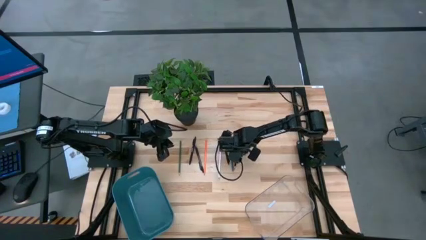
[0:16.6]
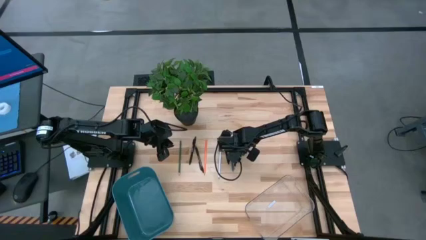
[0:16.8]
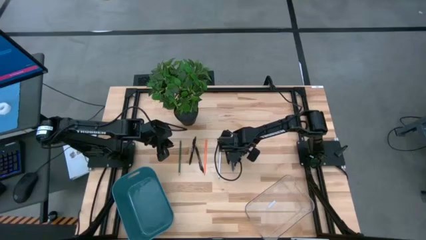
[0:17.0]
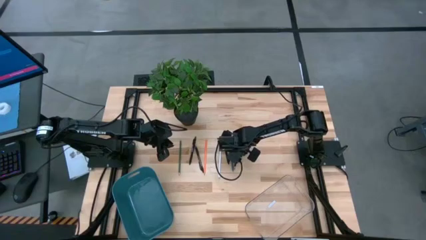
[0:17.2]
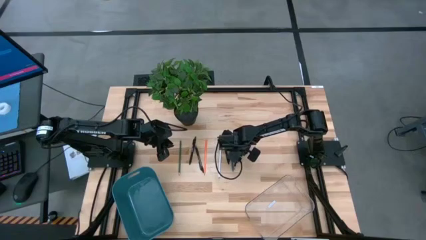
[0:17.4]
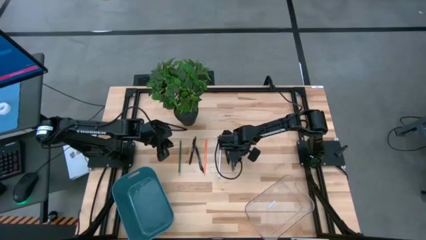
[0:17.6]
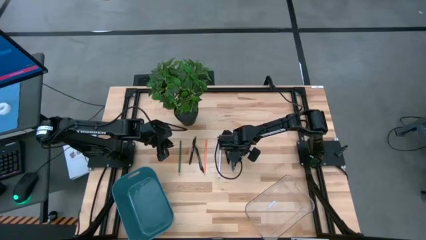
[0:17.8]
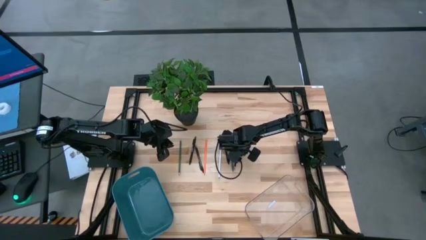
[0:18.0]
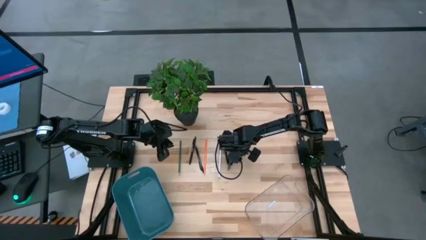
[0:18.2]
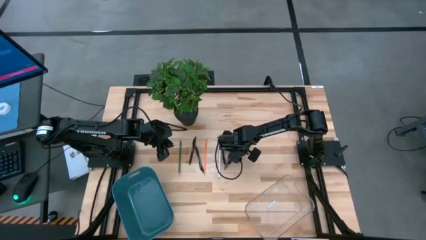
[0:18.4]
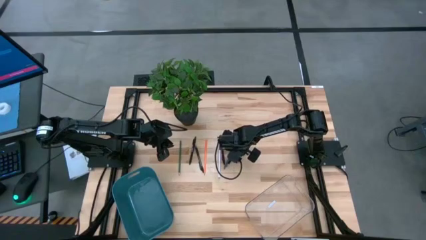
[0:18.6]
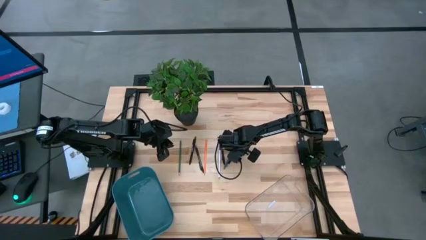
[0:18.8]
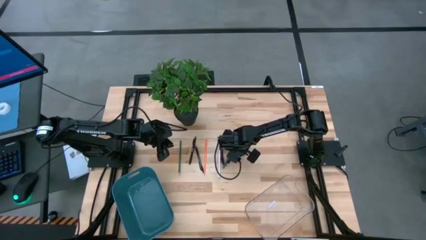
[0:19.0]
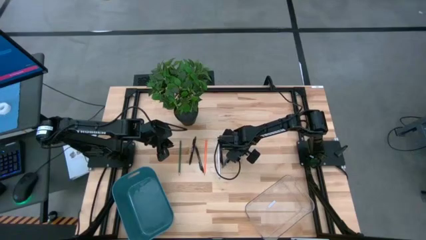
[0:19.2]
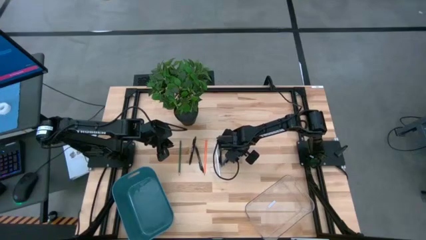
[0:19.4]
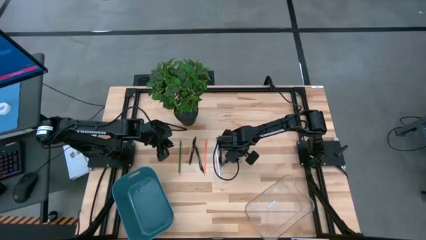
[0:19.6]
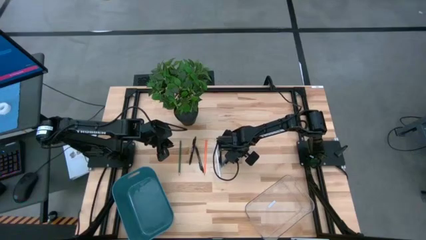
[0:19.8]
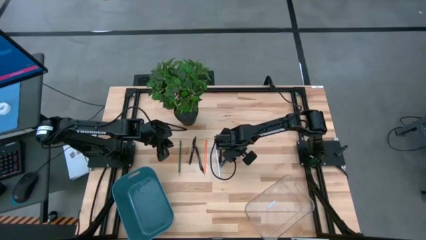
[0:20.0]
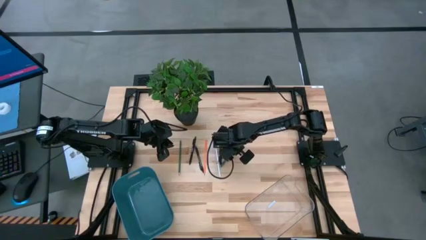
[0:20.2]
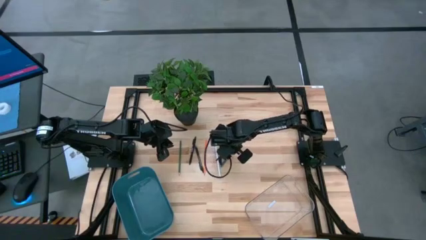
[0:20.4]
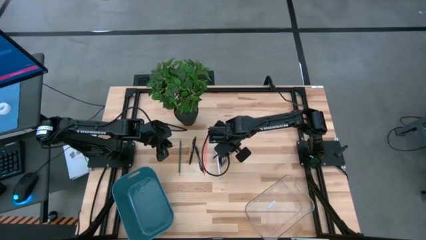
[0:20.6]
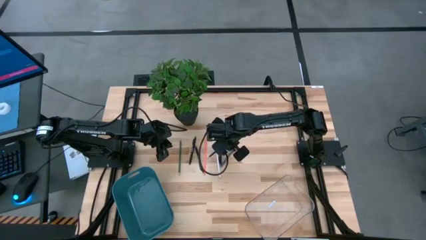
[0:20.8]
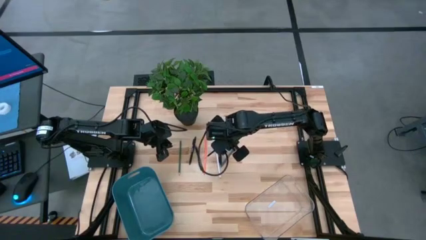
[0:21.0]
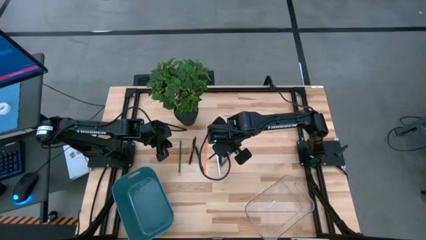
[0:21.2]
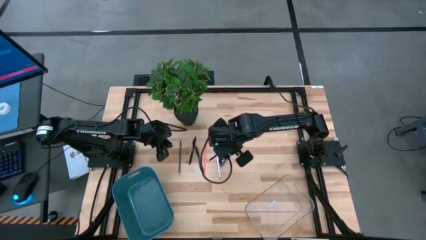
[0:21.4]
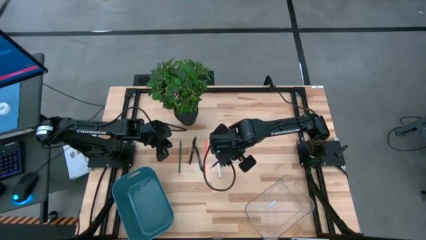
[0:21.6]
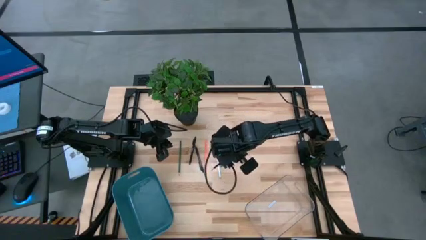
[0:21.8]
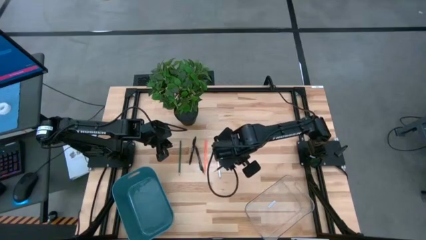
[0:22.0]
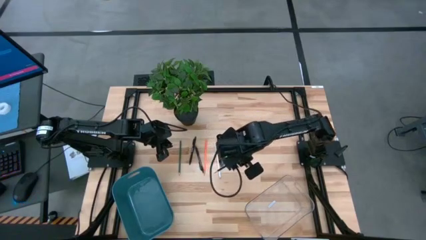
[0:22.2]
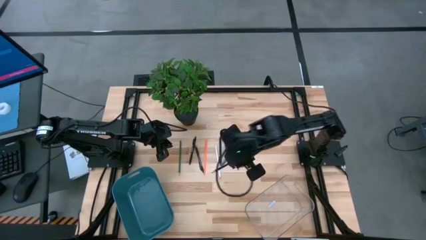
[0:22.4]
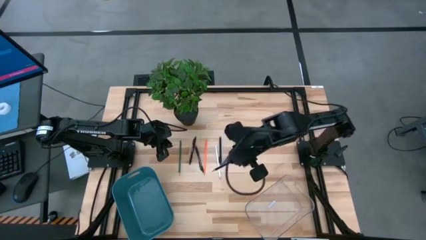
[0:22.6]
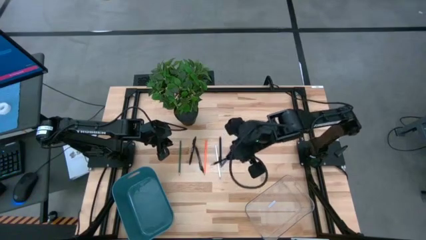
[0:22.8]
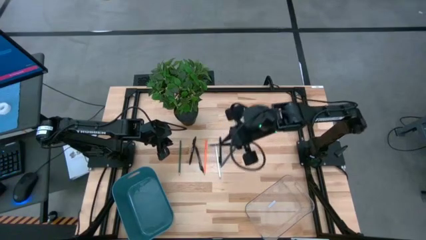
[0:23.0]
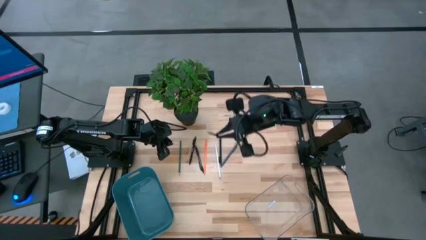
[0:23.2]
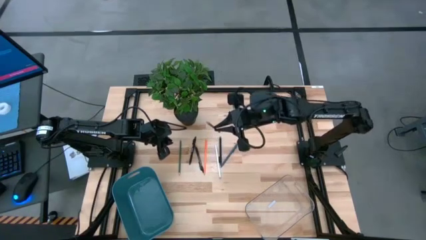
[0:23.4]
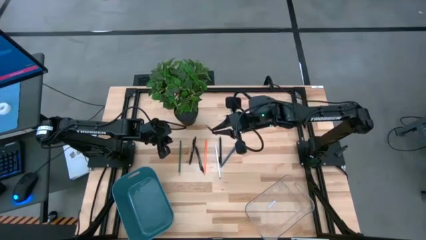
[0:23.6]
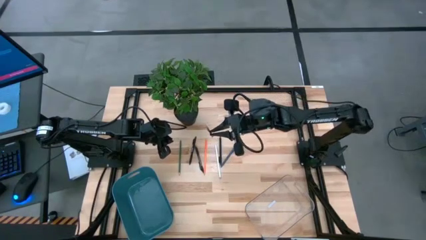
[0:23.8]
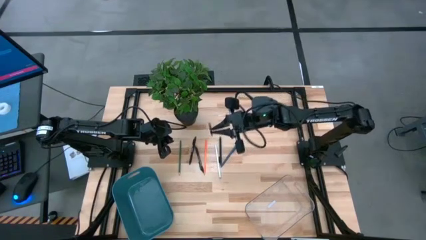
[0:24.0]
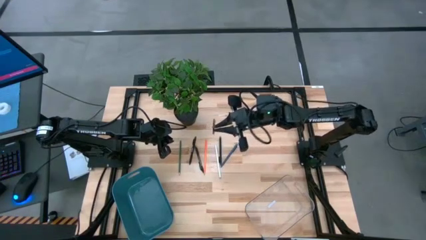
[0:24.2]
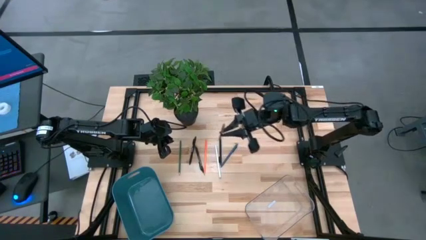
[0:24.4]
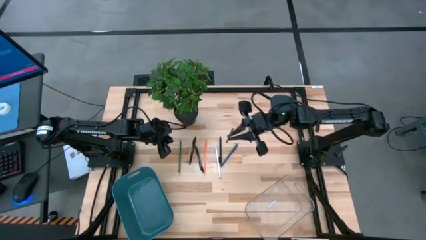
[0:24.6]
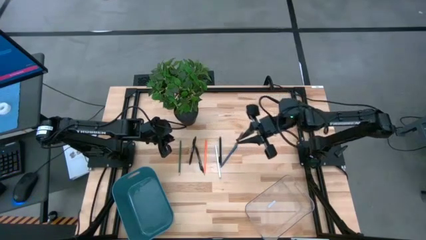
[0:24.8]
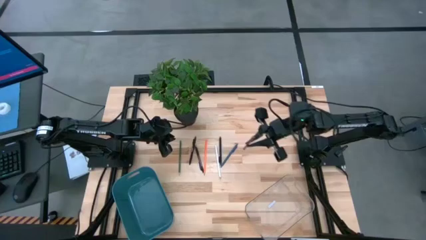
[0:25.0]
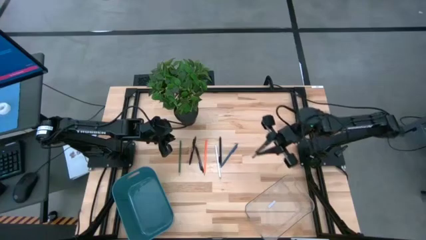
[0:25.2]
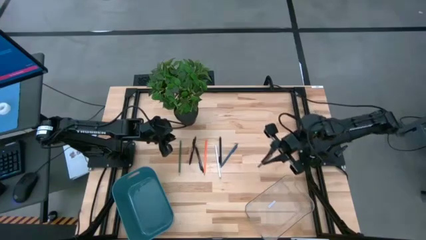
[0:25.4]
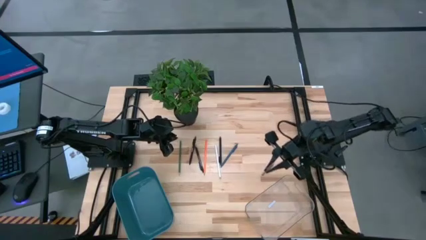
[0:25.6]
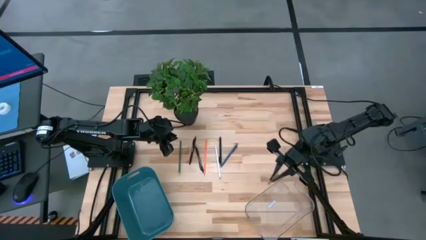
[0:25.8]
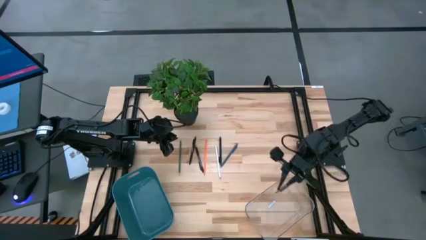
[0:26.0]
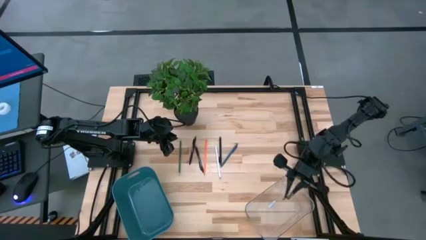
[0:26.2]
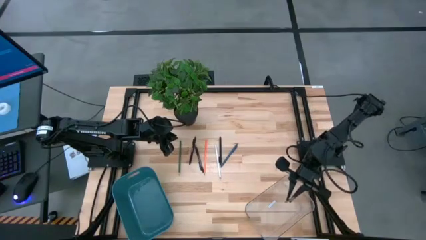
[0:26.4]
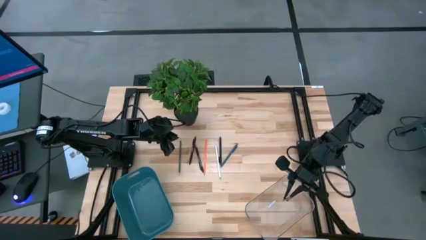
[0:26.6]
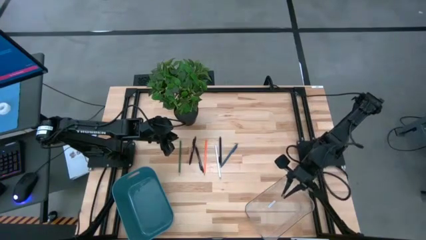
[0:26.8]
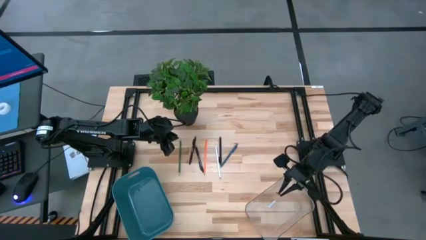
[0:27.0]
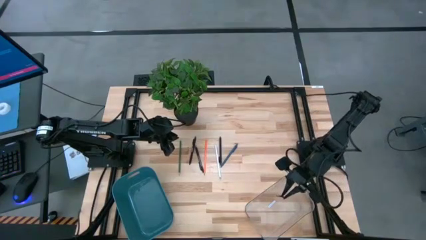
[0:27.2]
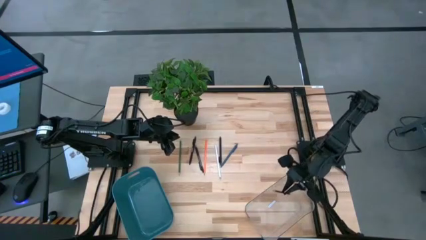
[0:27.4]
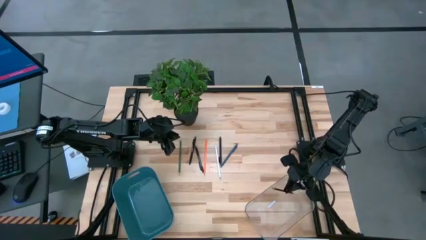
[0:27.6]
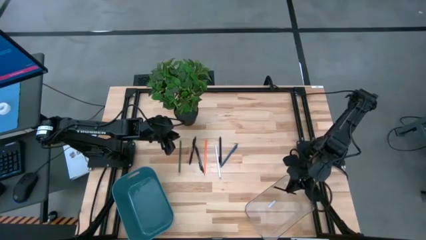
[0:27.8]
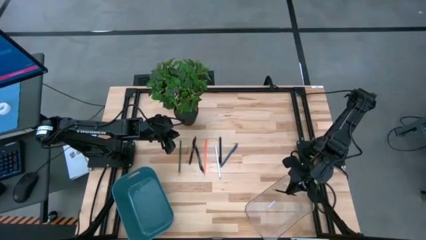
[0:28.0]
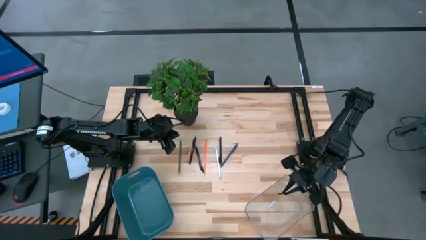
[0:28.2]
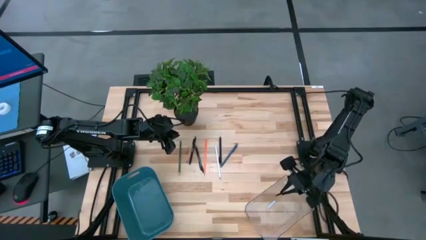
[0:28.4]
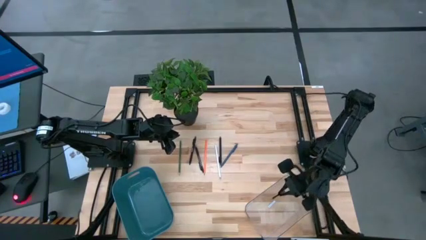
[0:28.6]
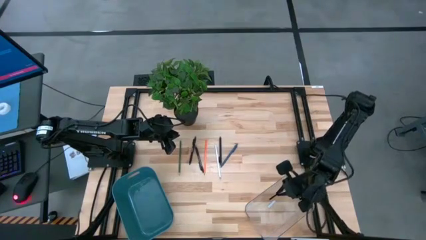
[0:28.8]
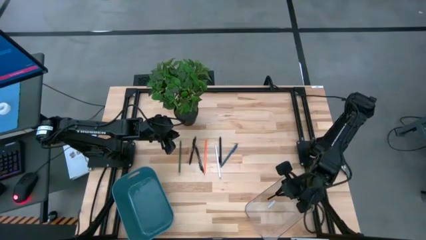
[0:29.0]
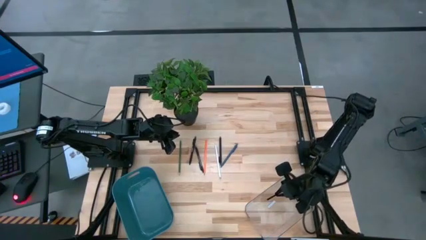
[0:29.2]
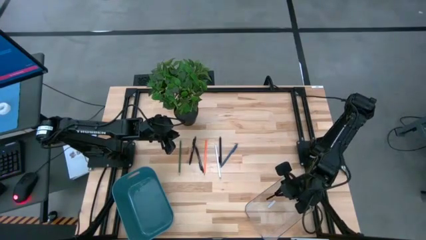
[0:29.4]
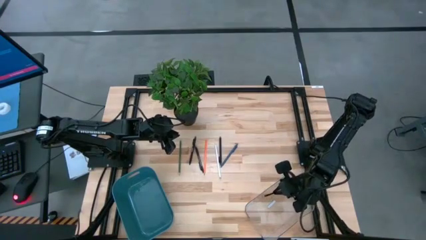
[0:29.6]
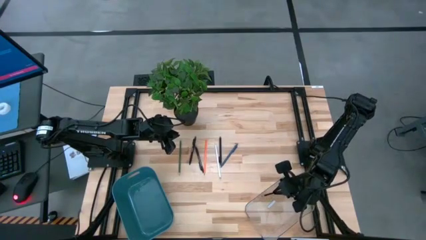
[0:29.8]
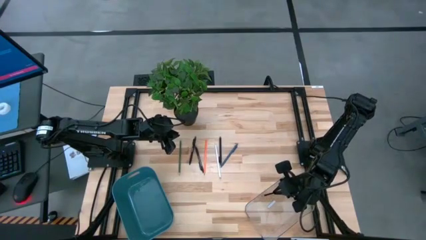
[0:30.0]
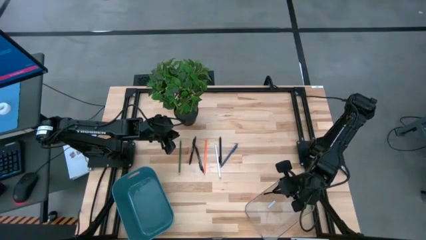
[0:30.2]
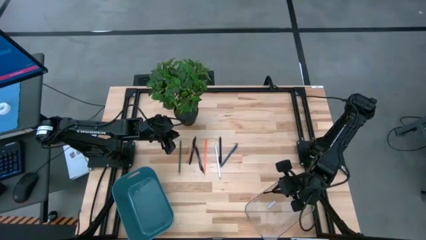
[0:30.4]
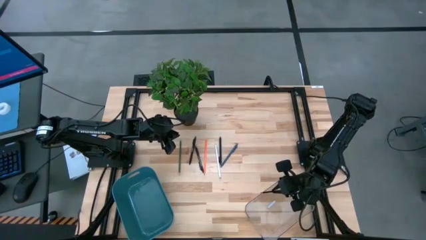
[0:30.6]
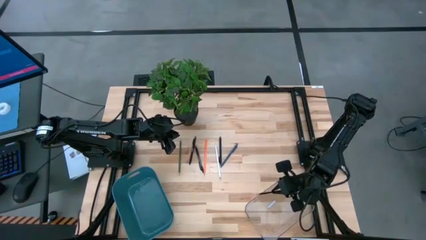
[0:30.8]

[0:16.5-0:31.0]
Task: Sort pens & pencils
Put the black pencil into the transparent bin

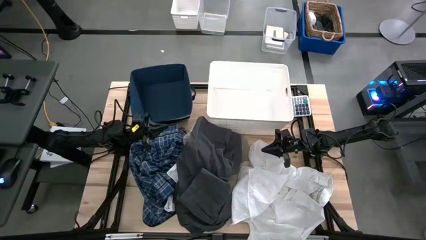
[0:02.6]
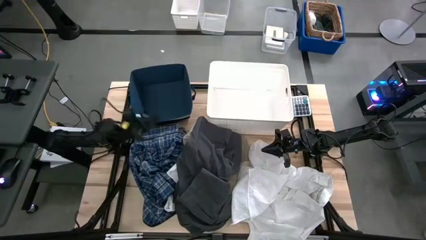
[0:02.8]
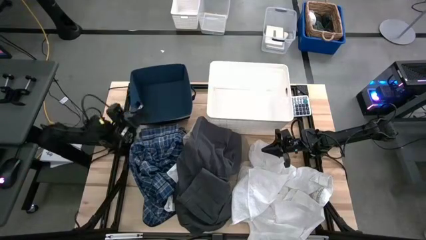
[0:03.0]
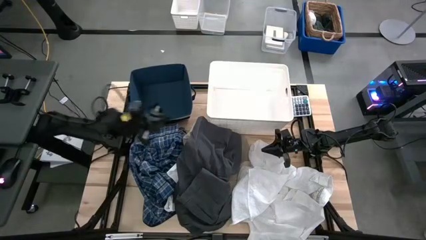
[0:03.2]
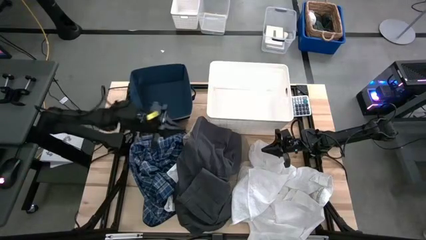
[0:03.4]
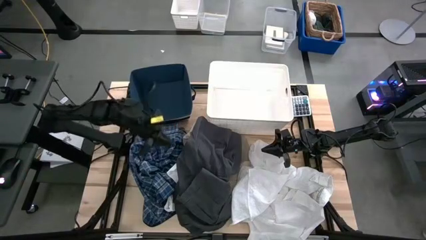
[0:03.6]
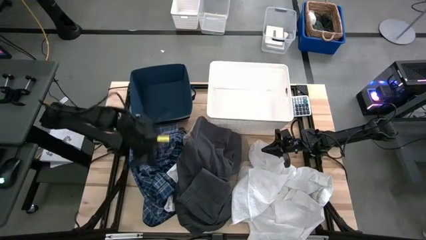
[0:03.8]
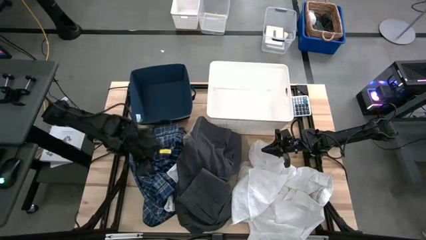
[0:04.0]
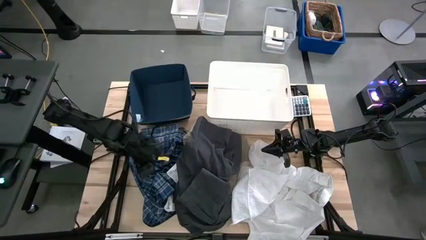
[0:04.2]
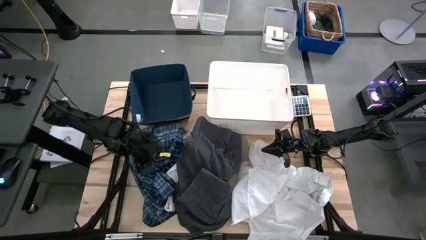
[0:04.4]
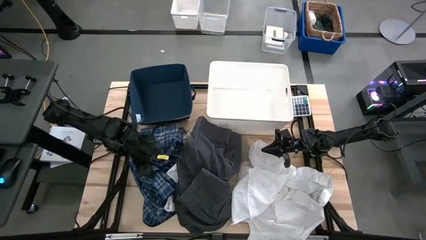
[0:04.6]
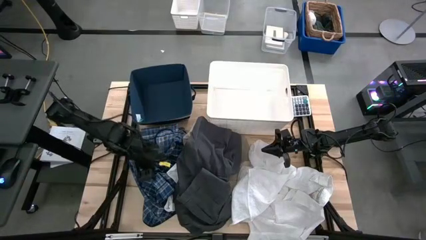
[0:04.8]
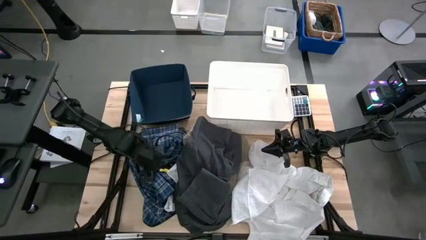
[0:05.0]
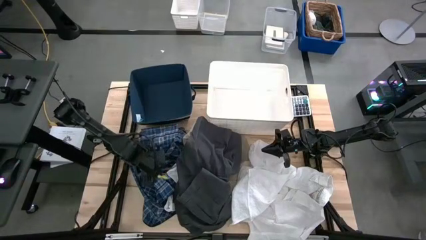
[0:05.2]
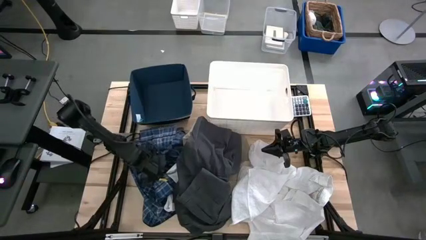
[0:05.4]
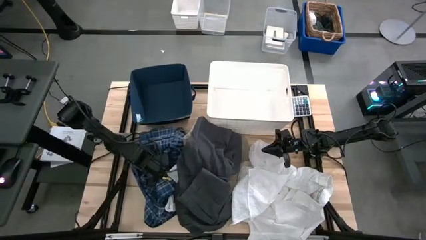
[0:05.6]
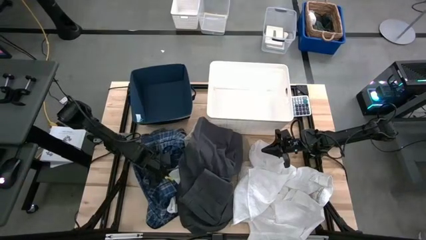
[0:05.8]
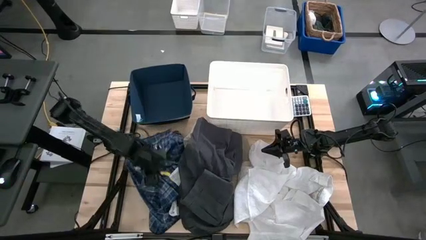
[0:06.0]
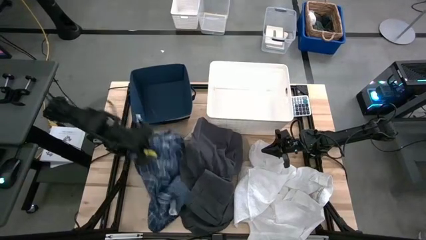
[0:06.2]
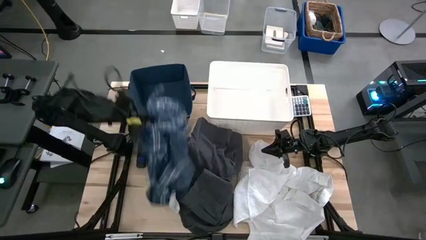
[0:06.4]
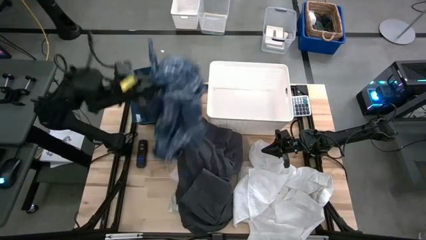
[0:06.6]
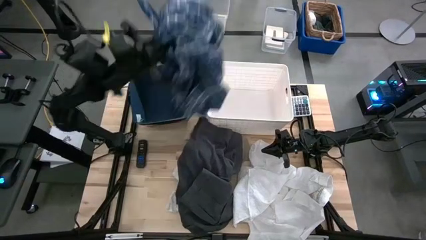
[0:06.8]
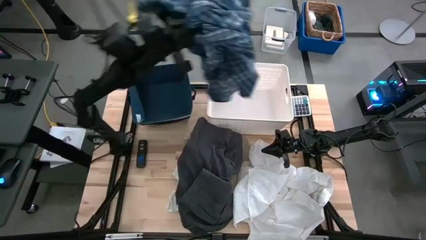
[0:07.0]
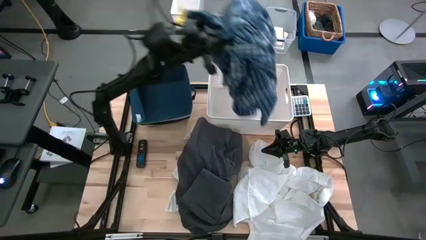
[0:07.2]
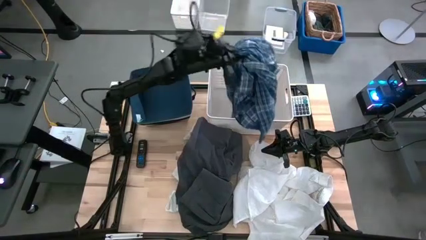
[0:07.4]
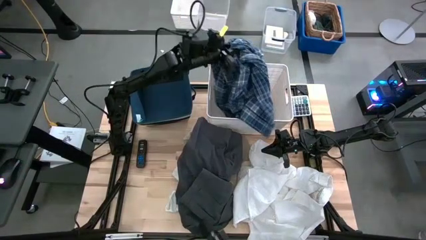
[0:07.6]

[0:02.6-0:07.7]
Task: Sort clothes
Put the blue checkered shirt into the white bin
